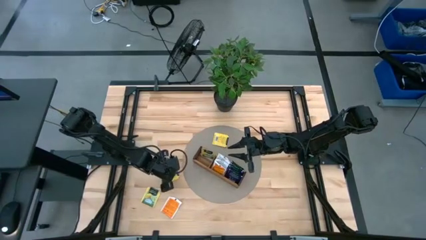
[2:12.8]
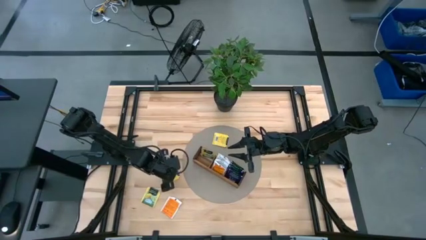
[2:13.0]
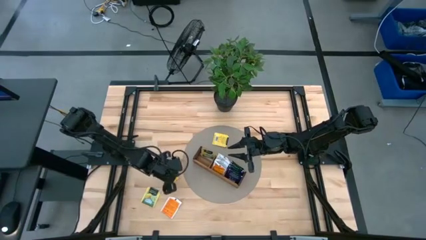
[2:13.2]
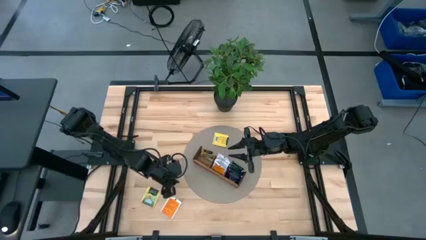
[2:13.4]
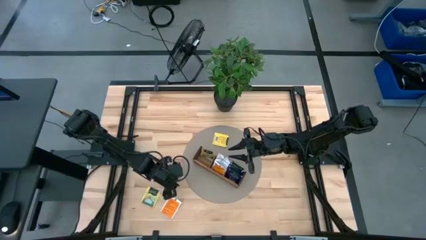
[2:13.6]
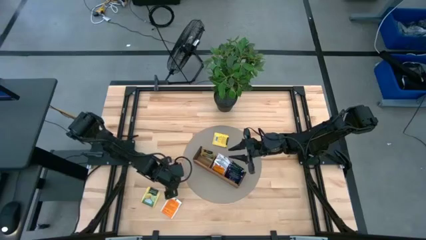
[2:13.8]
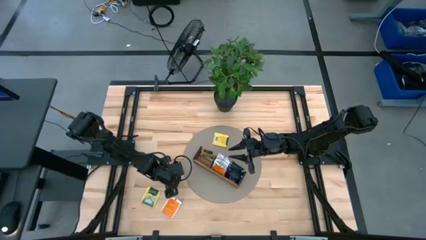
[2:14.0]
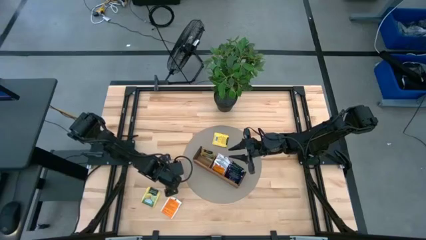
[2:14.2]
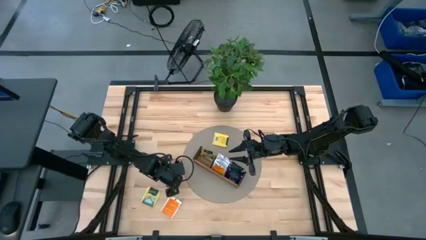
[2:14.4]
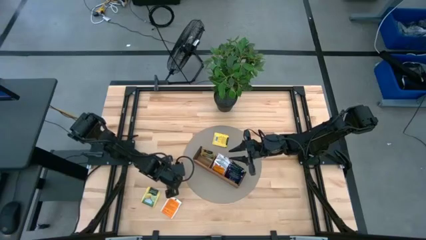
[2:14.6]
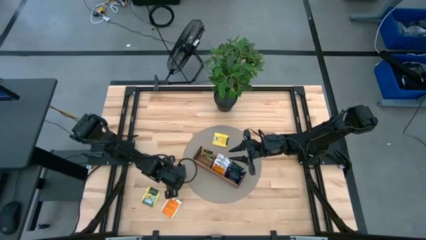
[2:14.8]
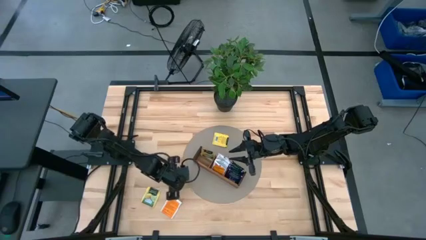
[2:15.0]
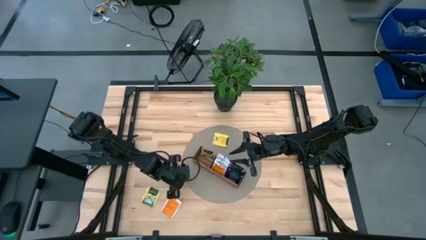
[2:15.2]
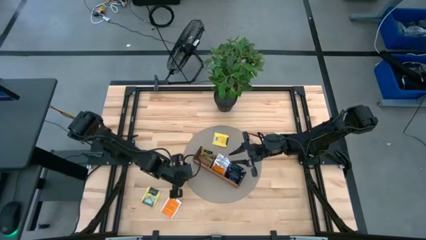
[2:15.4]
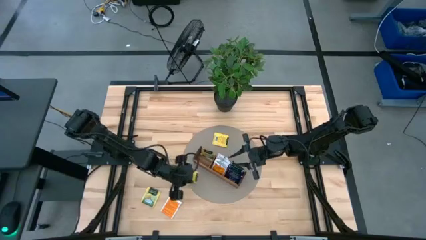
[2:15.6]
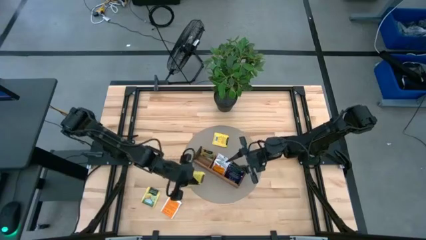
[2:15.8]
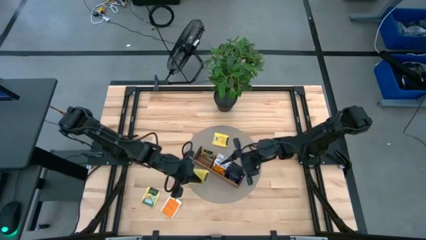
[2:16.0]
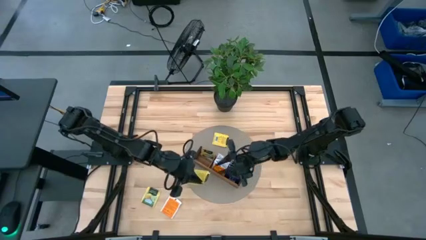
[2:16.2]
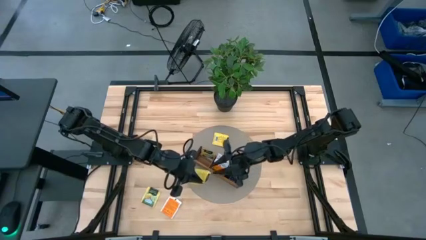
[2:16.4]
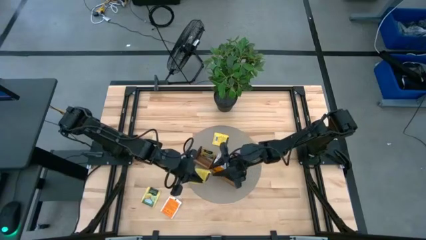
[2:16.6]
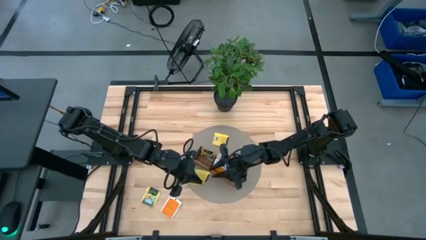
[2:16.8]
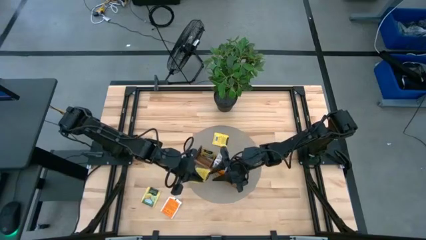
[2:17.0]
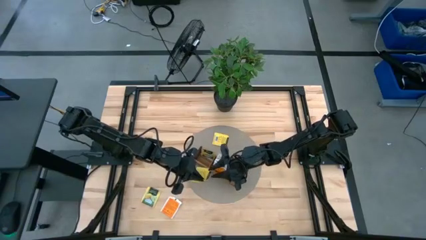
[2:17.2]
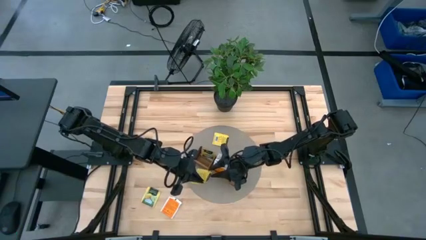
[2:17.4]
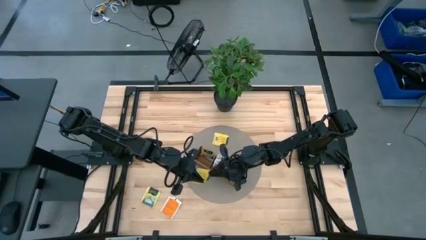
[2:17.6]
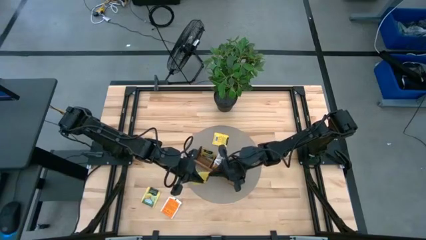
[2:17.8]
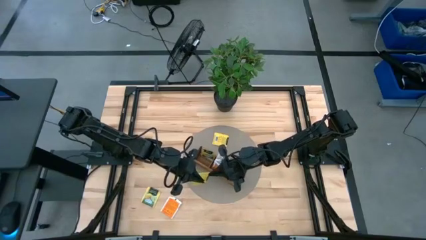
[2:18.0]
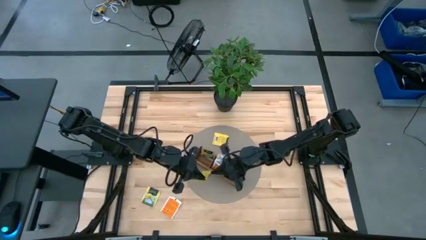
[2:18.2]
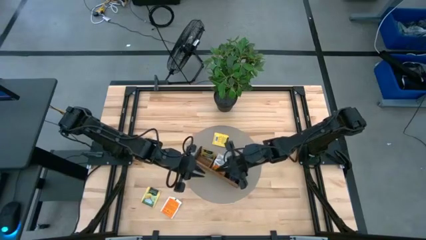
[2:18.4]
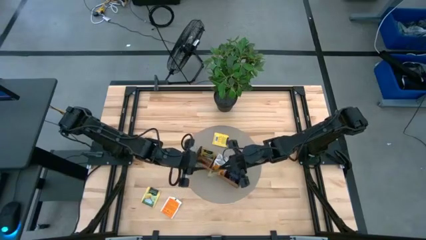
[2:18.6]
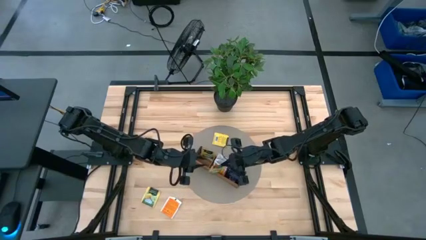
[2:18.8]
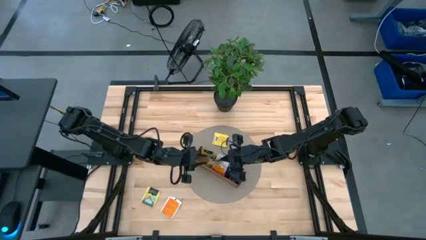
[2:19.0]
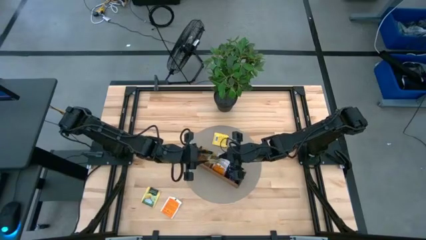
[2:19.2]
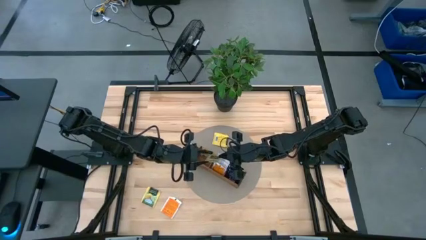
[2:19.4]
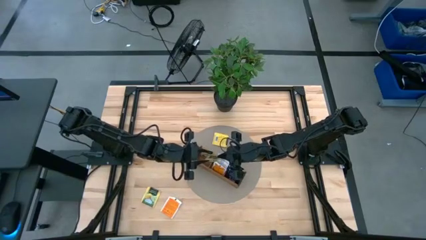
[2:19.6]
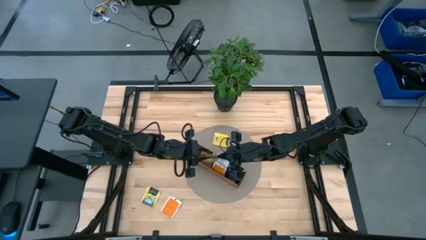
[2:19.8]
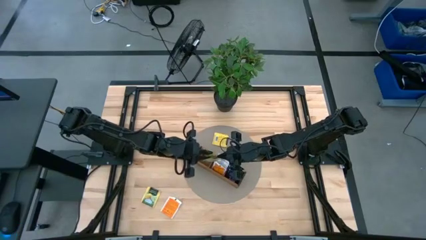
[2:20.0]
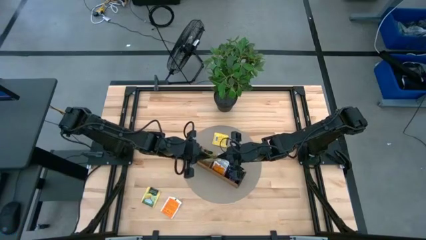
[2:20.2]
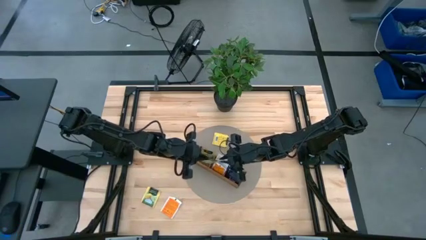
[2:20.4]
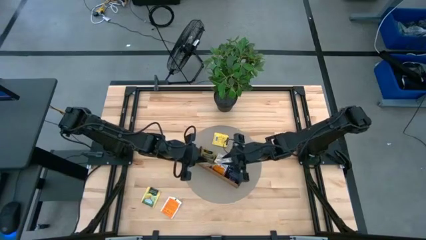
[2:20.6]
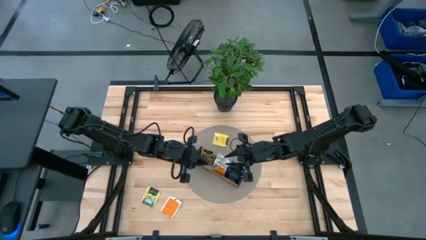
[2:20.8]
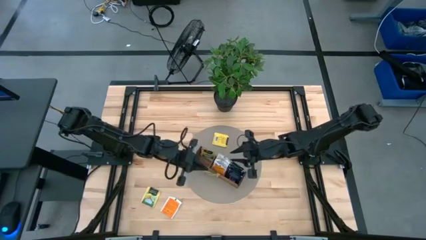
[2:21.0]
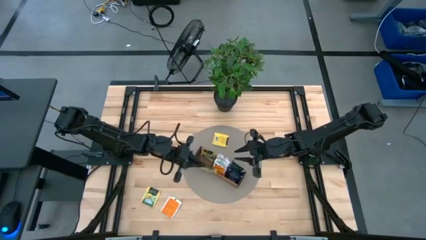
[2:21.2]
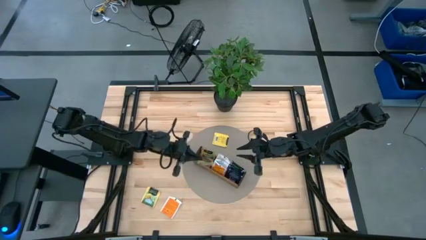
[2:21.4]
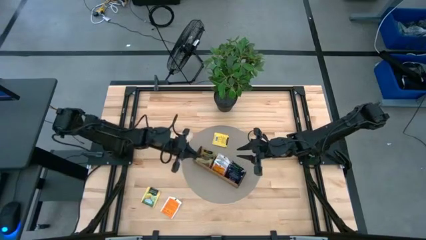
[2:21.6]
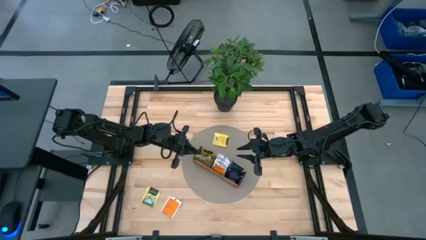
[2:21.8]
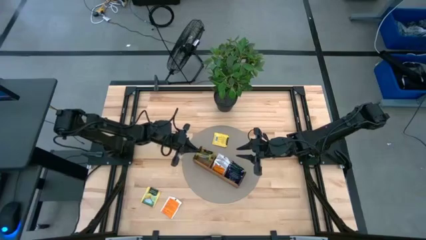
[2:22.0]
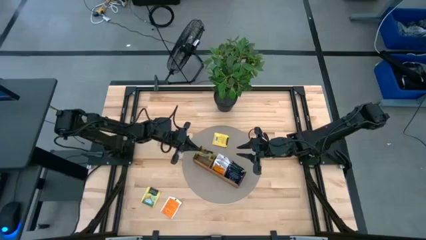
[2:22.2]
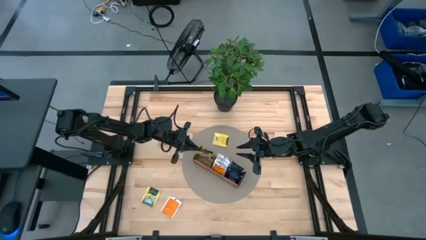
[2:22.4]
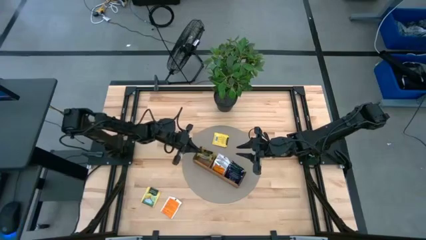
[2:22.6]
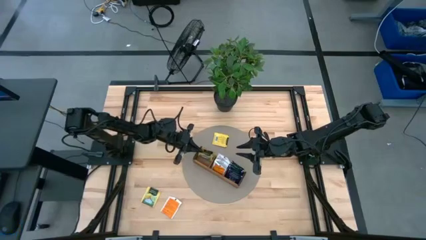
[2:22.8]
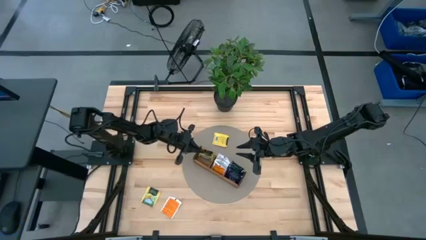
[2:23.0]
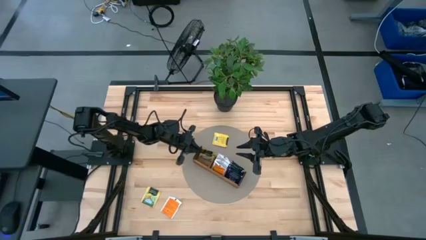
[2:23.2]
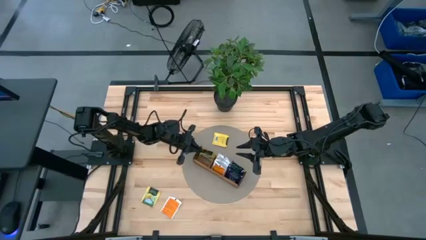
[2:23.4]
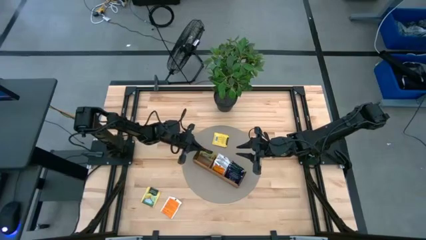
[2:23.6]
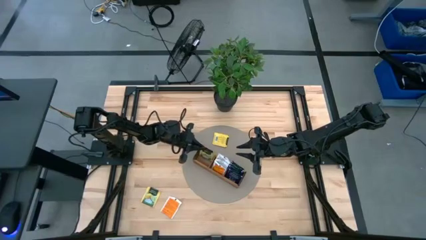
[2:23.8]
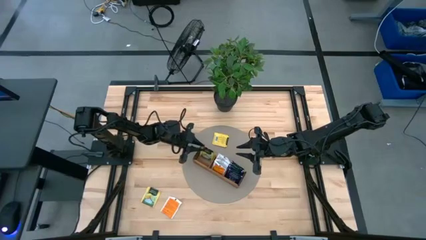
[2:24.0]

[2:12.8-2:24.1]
Task: Pick & Place Tea
Put the yellow tea bag into the left section of the wooden organizer

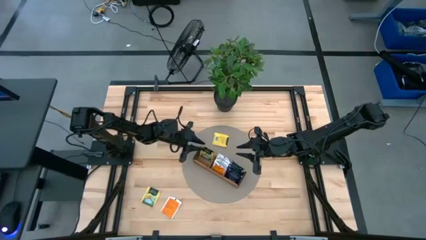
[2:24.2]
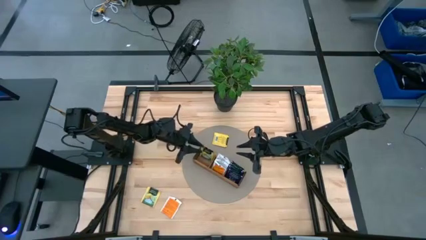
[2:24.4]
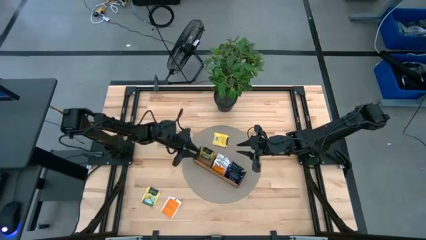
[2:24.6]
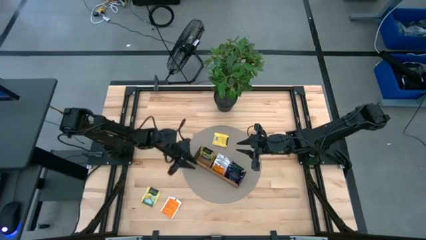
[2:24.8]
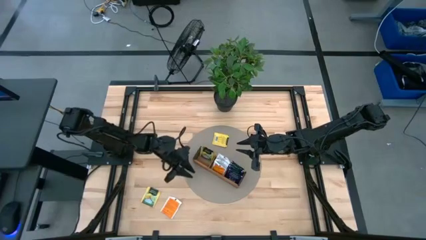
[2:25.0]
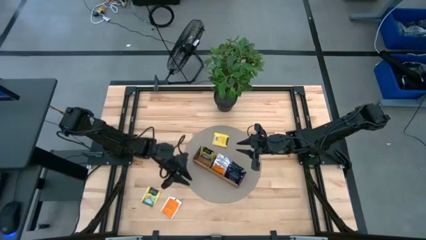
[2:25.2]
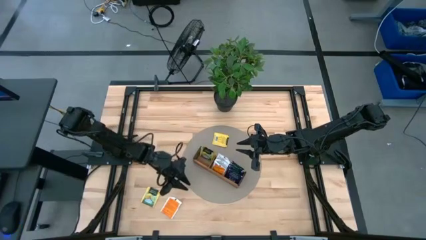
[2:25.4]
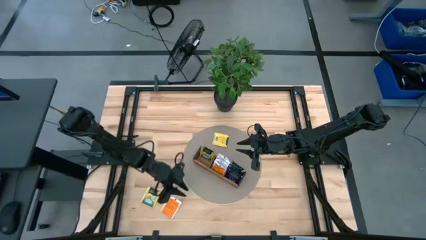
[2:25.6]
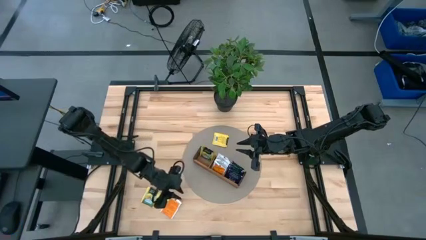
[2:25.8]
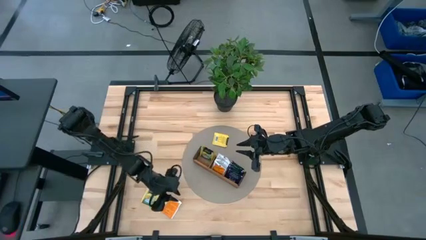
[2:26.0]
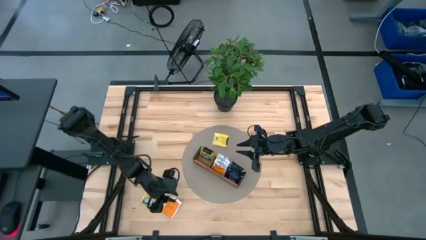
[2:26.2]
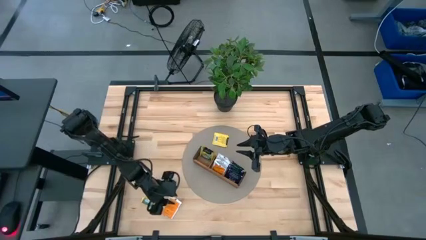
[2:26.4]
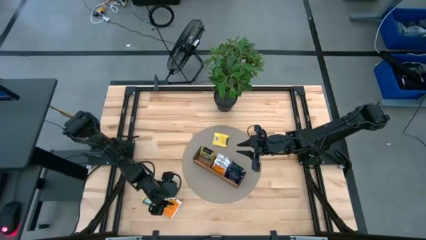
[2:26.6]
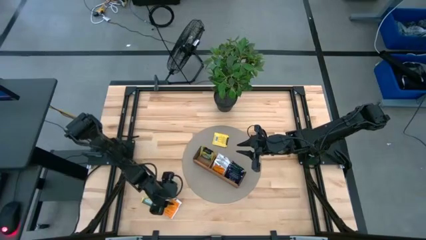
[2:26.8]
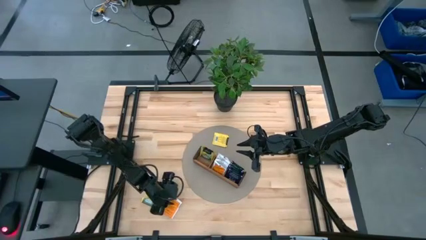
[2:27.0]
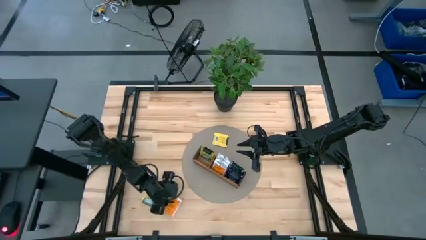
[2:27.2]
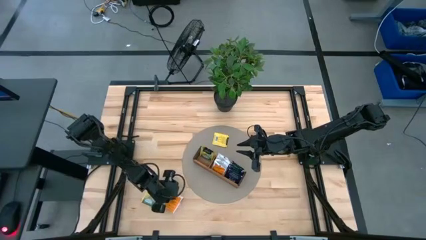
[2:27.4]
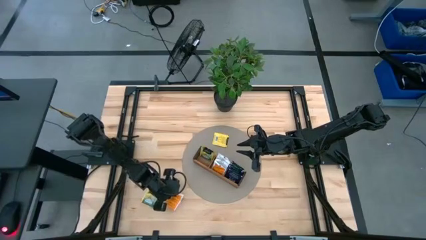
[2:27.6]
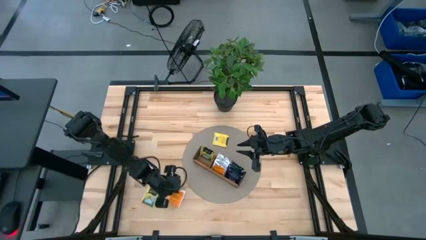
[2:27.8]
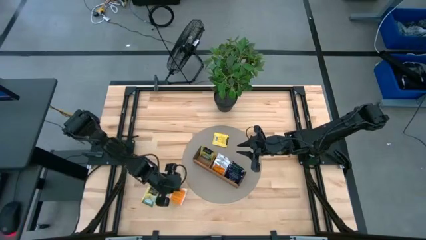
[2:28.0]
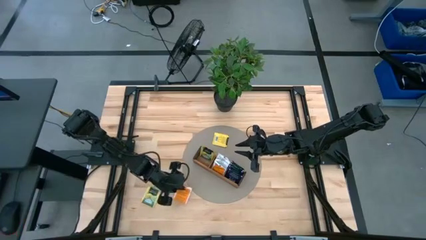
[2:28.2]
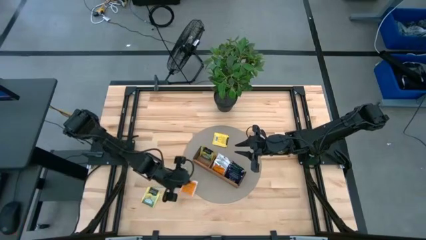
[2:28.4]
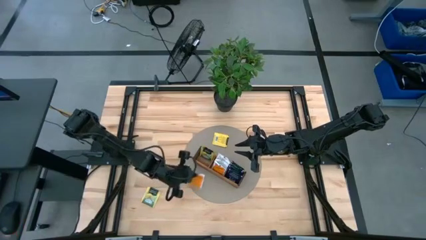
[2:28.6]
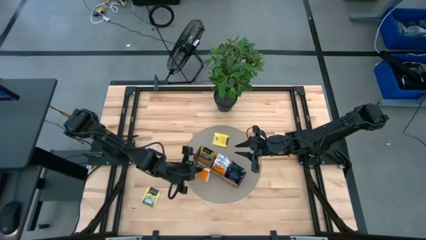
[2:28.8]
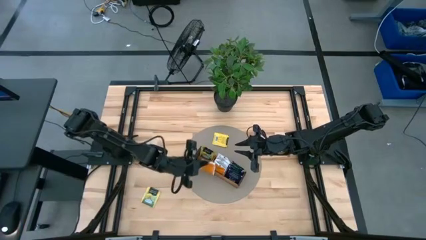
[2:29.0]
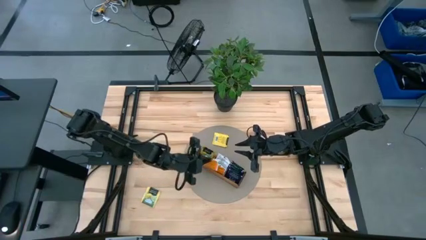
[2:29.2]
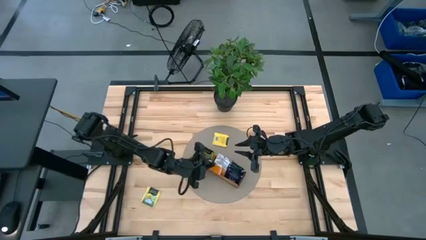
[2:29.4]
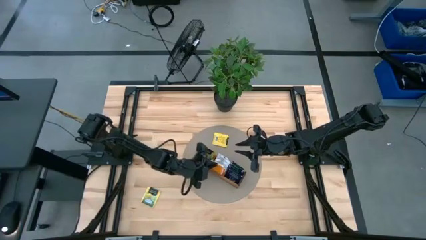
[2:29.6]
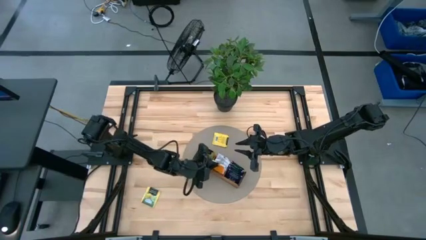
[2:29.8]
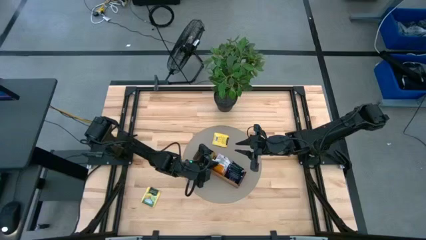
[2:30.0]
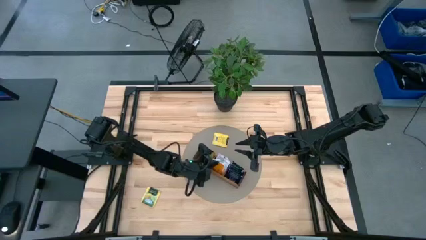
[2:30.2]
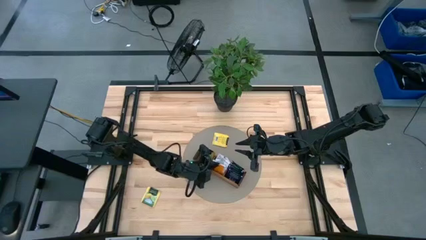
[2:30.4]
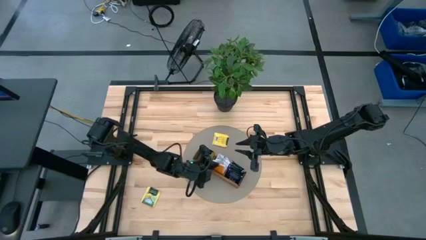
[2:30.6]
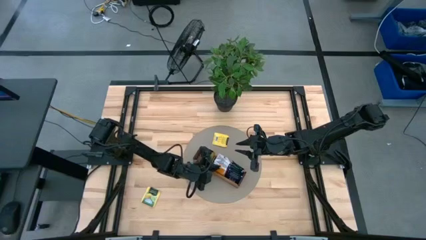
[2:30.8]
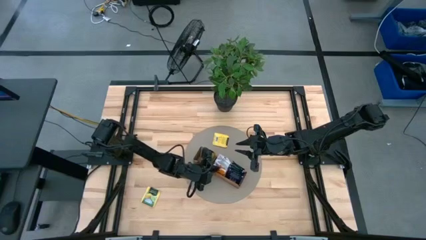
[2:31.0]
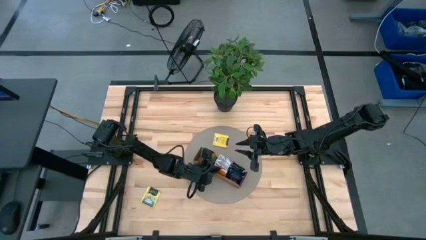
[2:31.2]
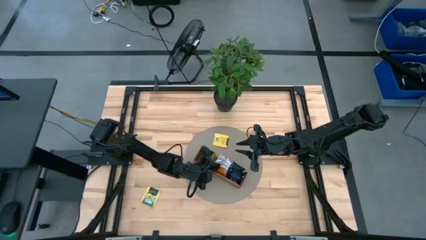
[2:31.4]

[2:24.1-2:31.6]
Put the orange tea bag into the middle section of the wooden organizer
